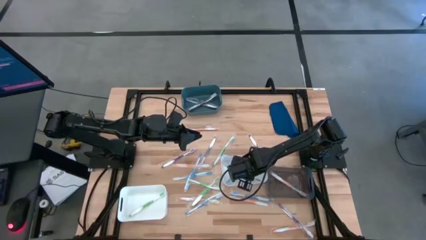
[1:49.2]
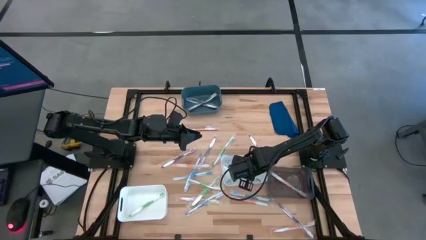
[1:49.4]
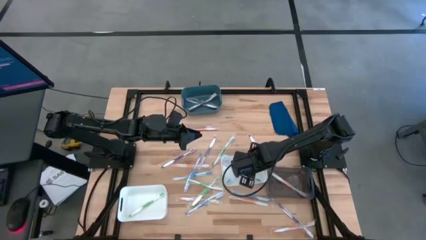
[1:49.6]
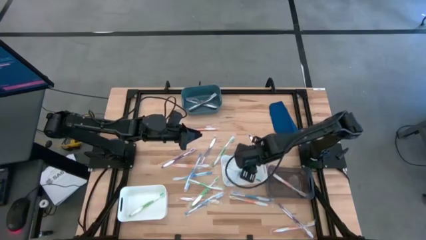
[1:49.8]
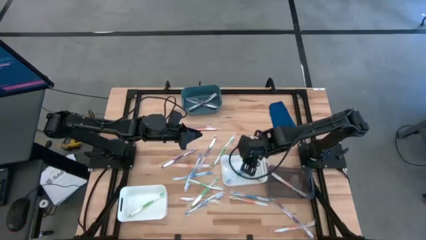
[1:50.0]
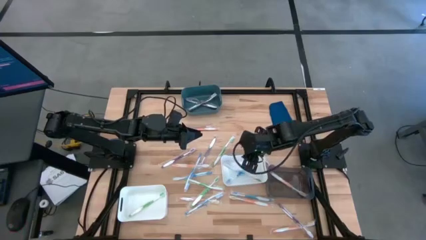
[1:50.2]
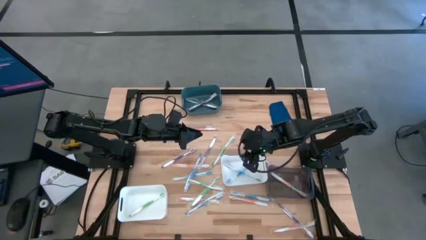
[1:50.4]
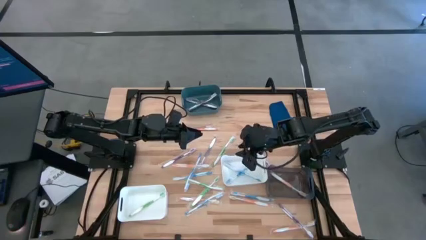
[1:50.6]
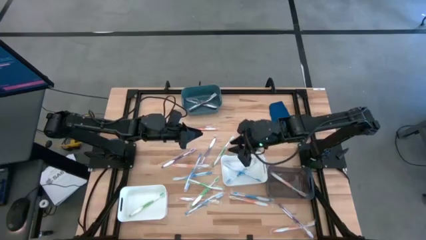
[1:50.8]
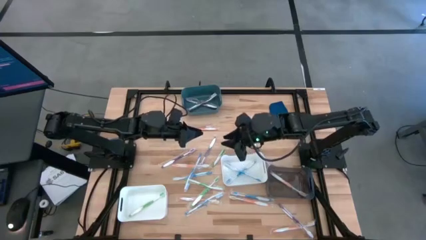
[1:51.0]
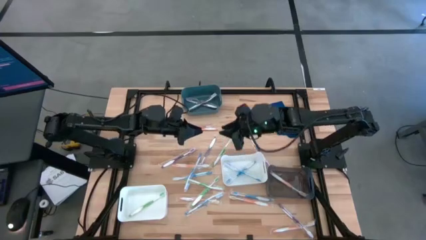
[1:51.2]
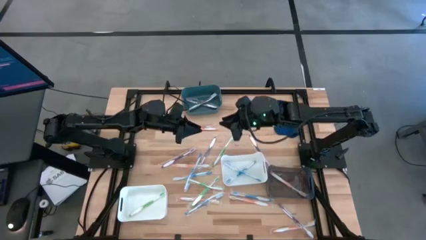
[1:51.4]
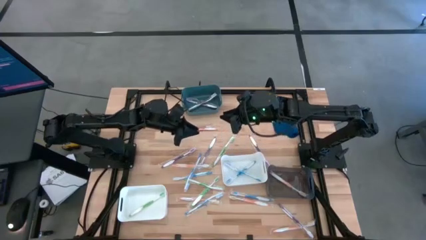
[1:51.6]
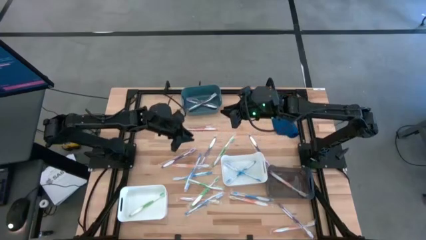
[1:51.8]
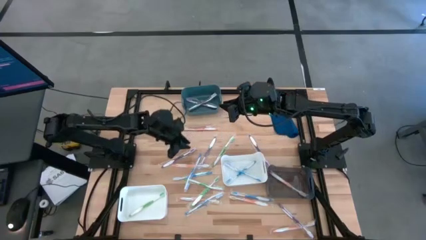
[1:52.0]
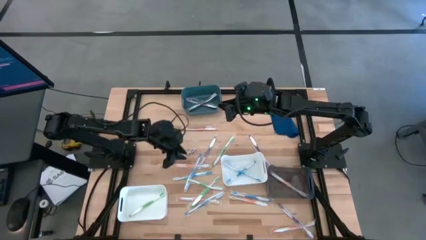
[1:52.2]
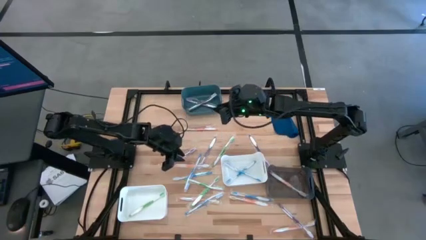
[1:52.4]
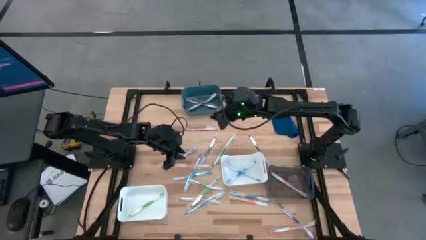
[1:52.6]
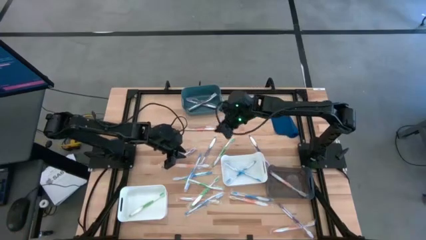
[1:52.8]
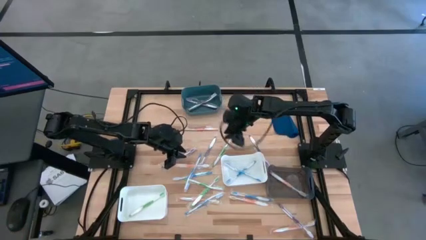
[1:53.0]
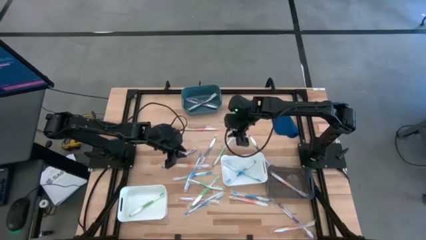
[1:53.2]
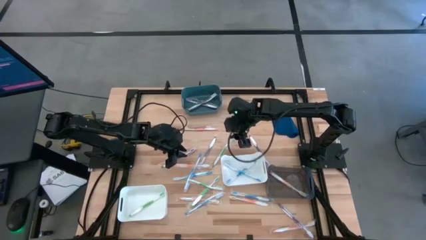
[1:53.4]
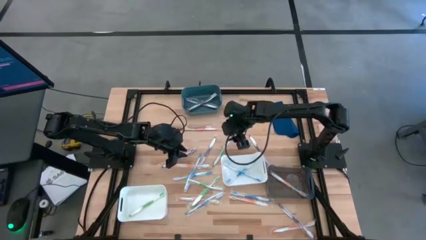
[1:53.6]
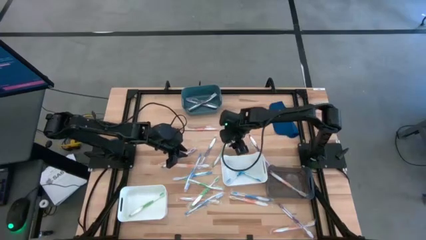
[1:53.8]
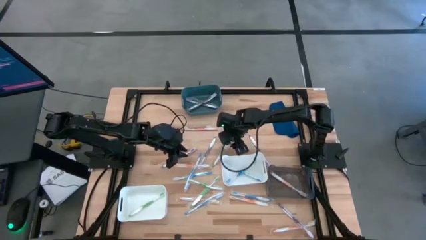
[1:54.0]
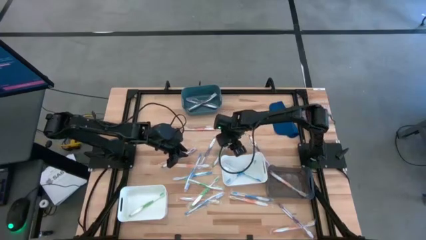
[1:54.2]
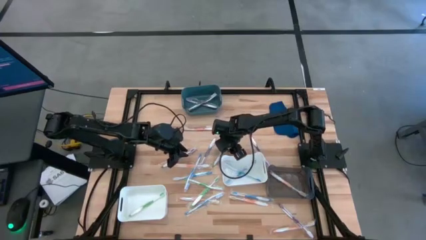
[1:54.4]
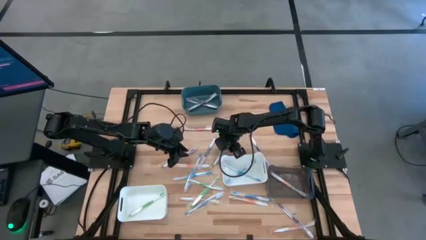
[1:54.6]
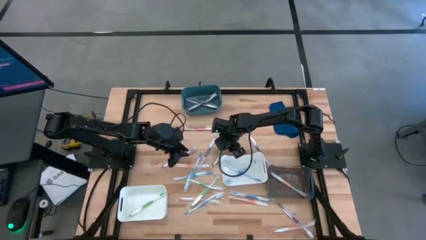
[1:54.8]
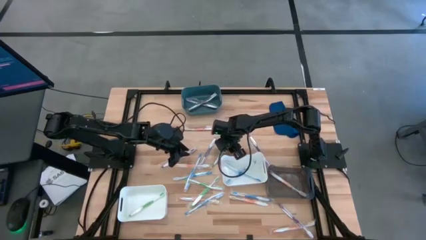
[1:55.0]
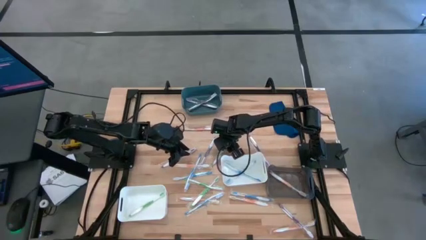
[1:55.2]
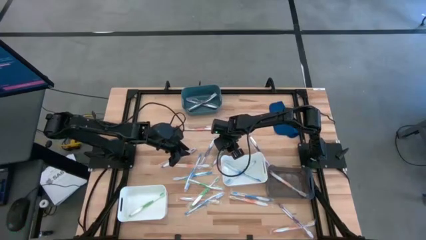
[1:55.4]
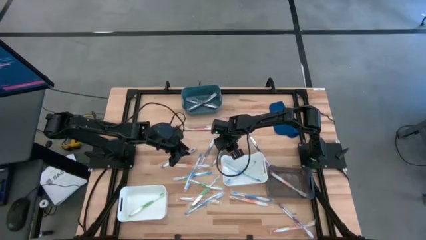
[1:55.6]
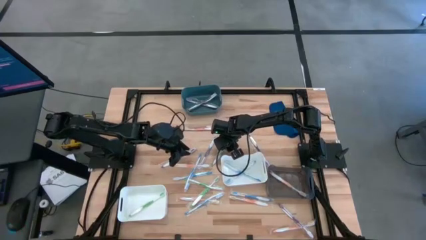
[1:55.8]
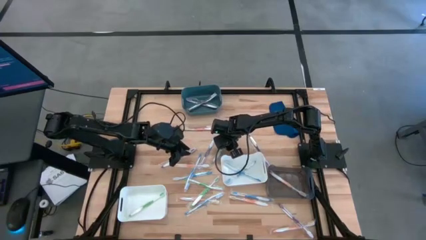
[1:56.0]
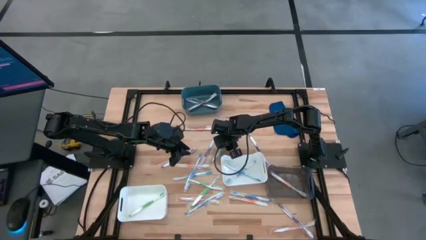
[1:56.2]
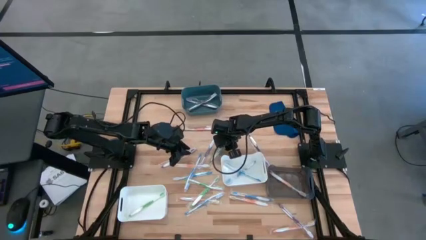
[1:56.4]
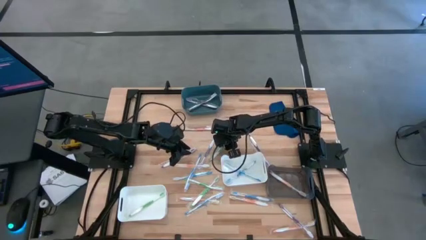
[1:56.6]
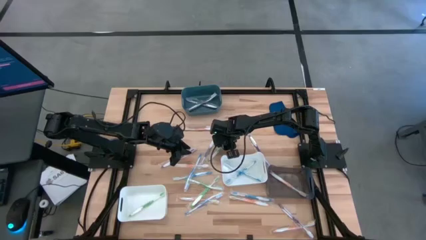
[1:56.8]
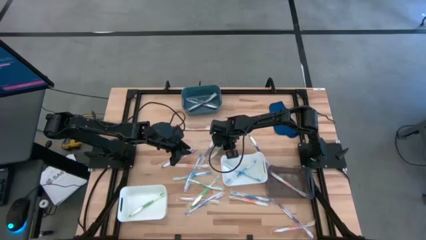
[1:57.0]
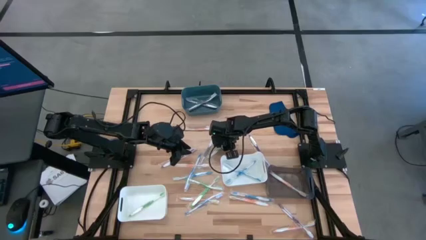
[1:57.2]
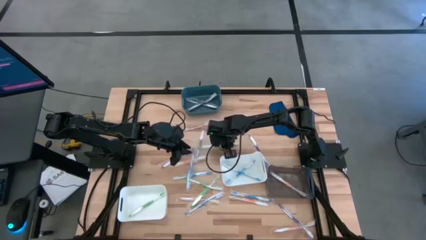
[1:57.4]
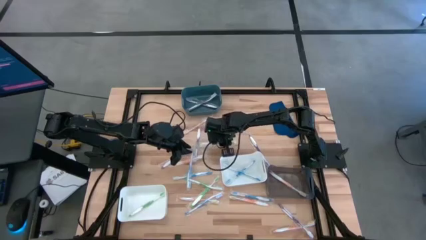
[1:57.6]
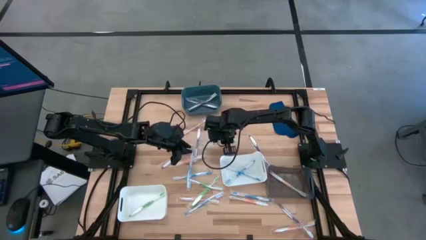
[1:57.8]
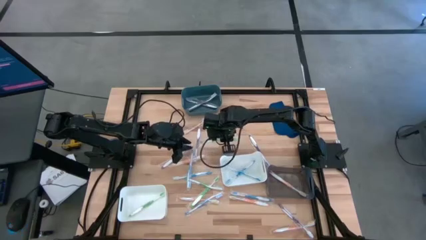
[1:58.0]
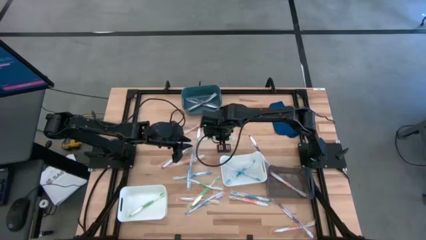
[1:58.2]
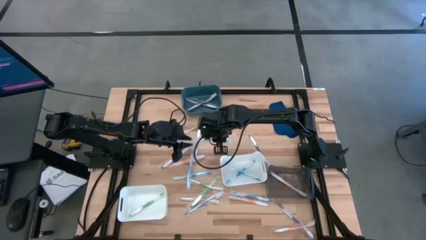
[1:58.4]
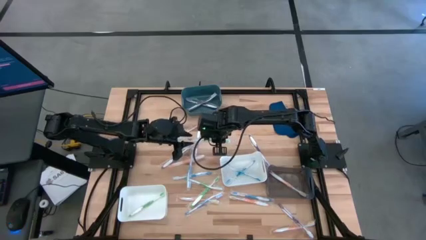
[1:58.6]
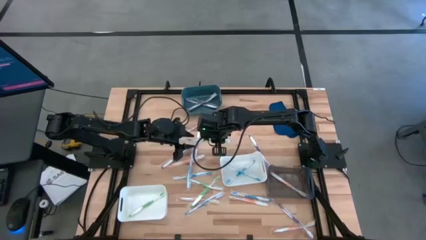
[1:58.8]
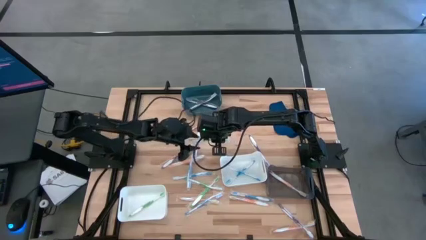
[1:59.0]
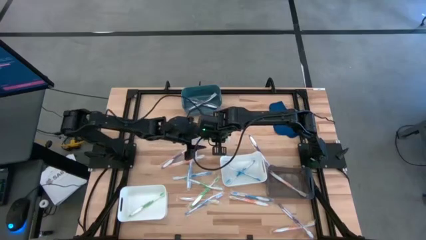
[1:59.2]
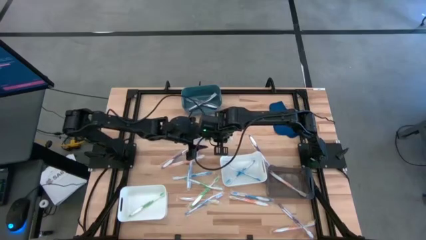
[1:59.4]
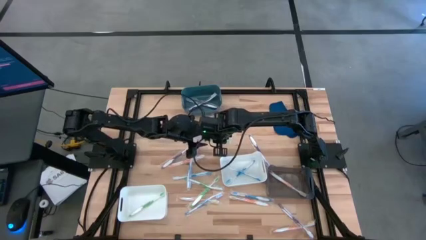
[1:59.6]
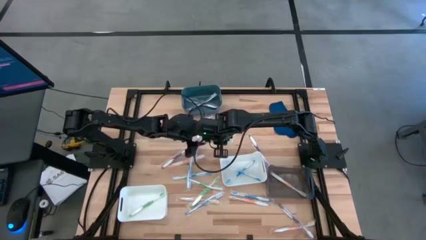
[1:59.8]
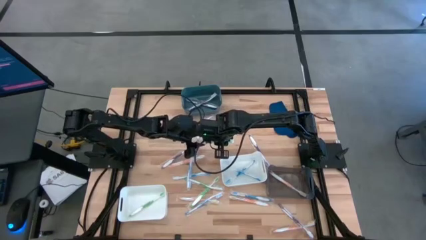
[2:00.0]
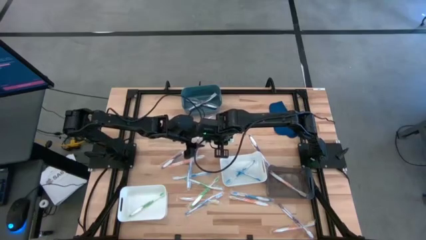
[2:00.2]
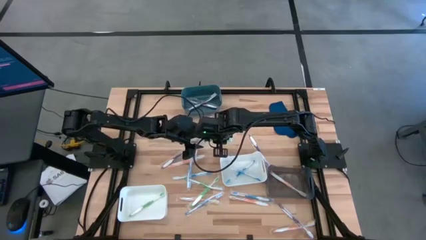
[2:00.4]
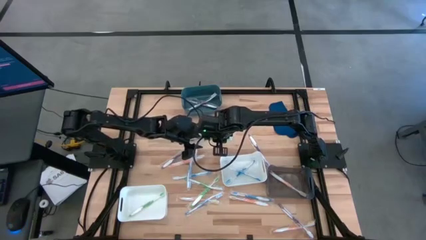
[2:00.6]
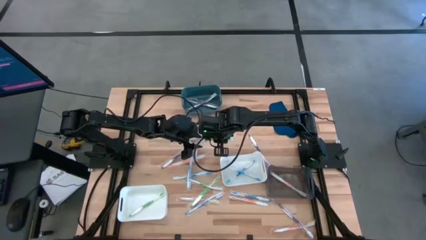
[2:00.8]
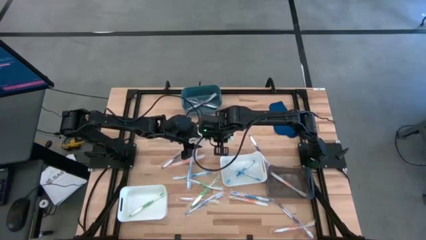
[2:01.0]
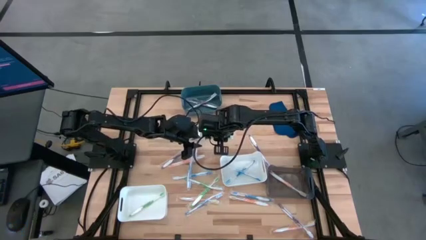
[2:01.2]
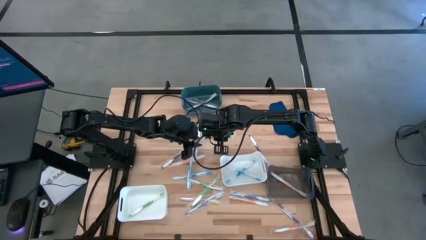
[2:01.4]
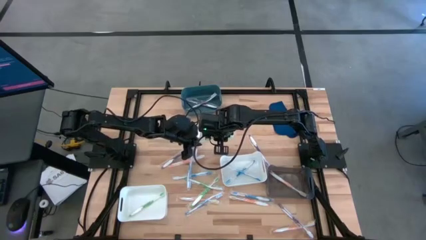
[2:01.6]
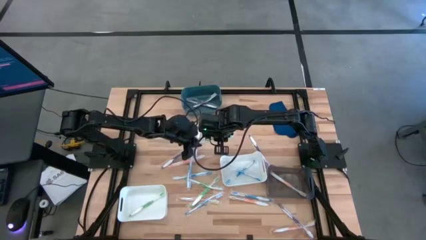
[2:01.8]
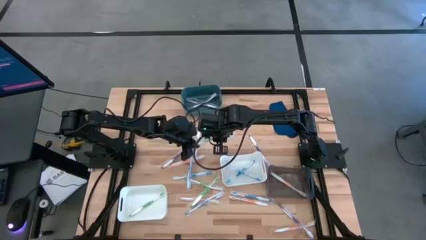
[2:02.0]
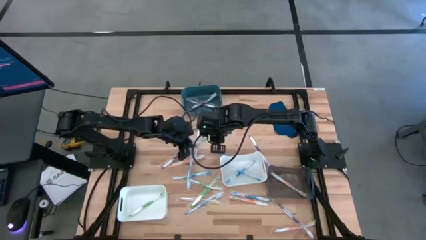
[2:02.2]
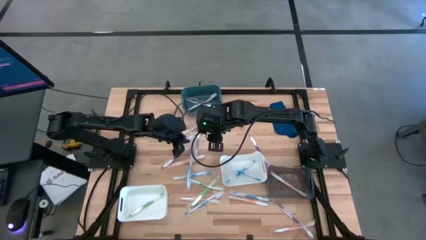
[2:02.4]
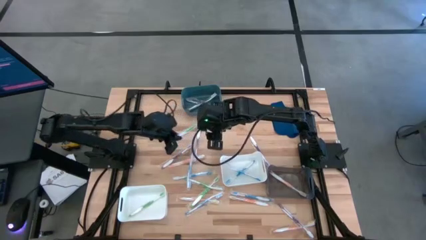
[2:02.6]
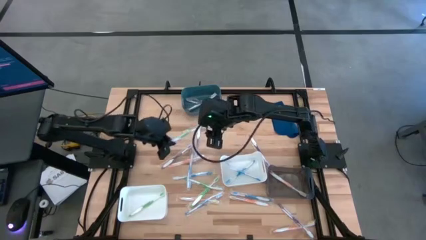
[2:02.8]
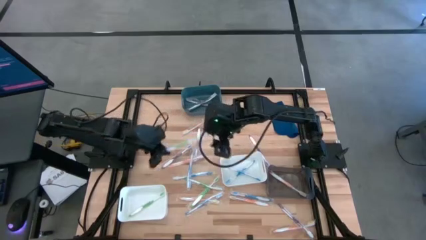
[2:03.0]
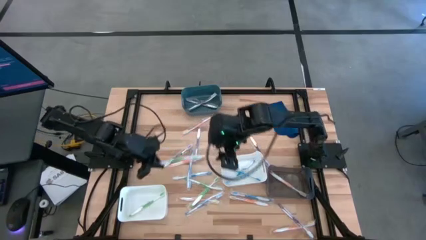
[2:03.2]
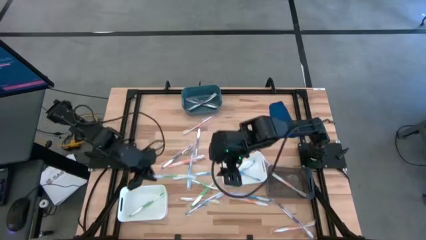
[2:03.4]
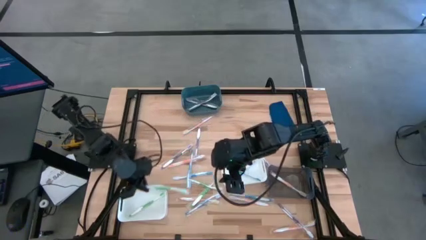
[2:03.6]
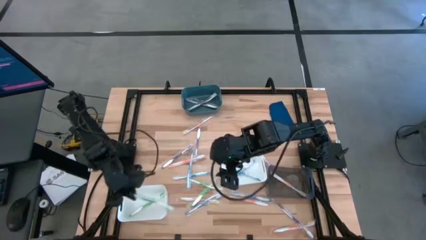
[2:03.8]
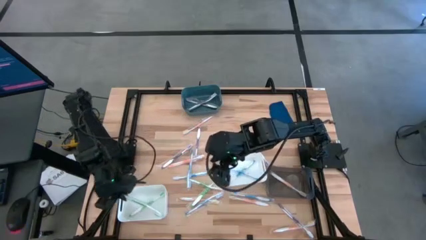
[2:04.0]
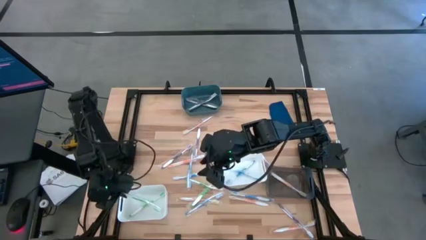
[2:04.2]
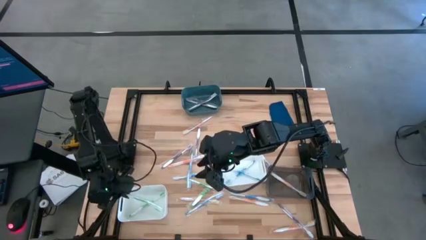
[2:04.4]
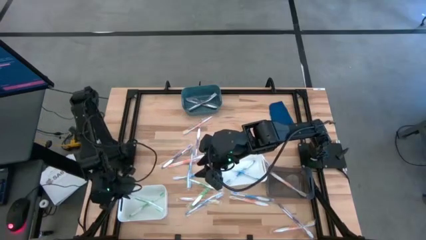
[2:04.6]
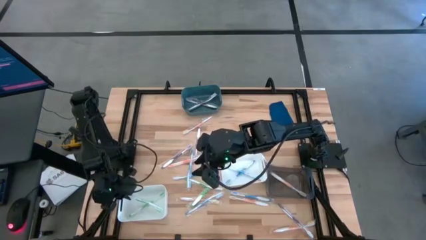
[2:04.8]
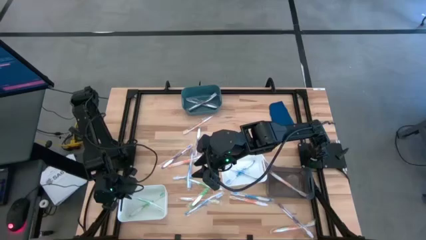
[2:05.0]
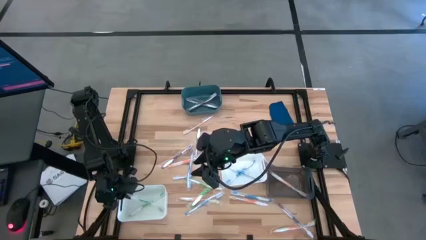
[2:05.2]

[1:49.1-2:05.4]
Task: Pick & Place Toothbrushes
Put the green toothbrush into the bottom white bin

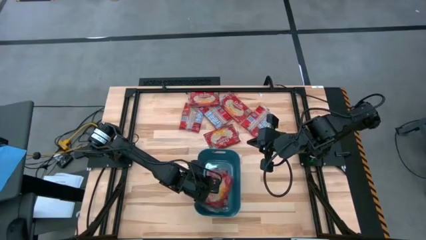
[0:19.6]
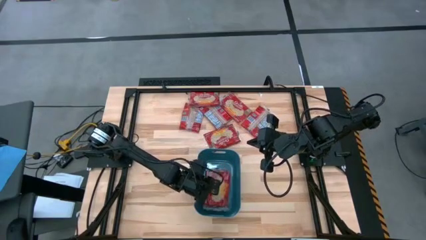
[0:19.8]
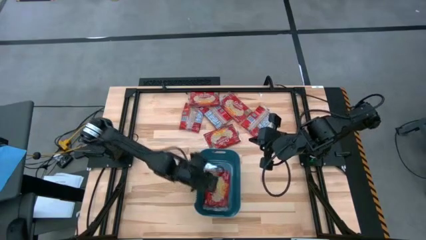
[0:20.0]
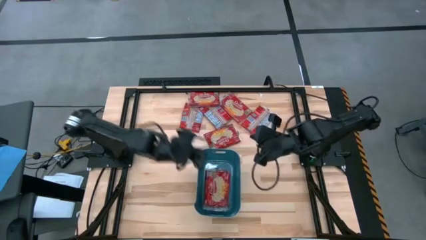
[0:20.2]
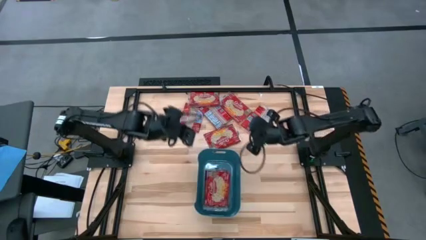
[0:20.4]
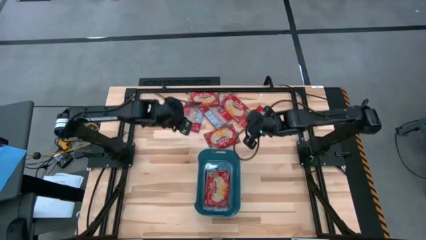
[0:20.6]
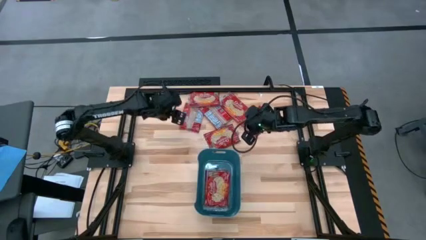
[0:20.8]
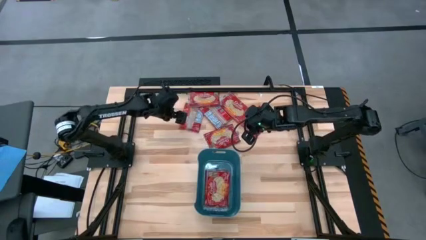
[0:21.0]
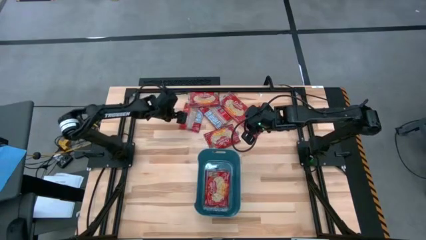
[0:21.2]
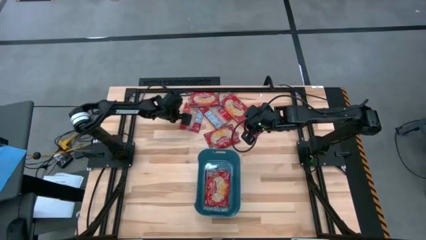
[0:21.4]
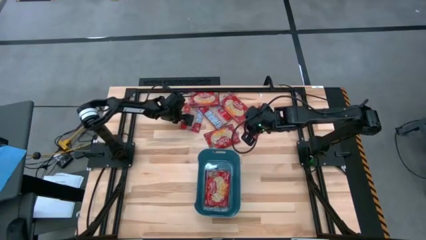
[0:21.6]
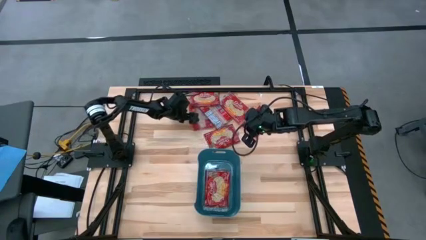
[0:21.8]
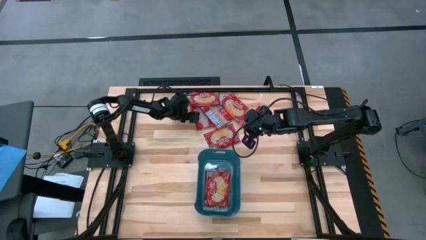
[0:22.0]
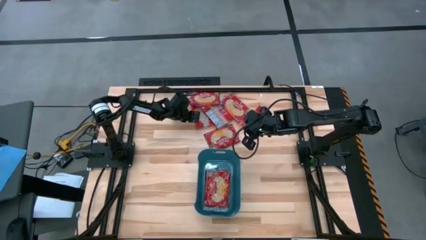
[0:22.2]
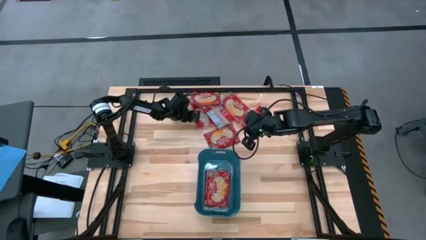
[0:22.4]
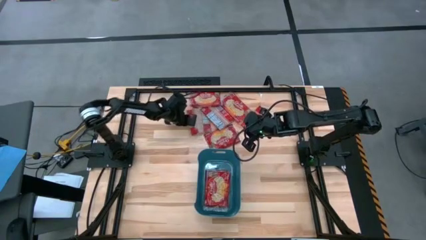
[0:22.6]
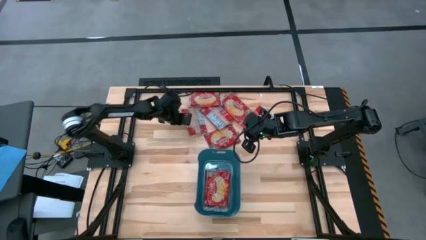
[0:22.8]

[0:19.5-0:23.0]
Task: Sort popcorn bags into baskets
Put the red popcorn pack into the blue container
